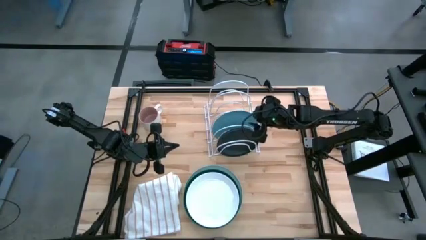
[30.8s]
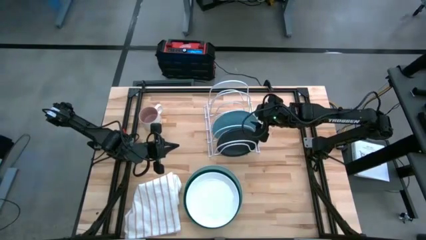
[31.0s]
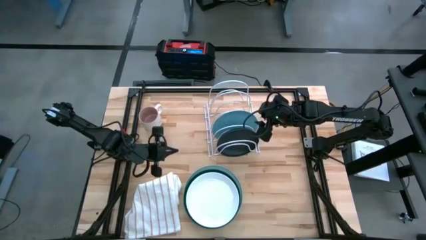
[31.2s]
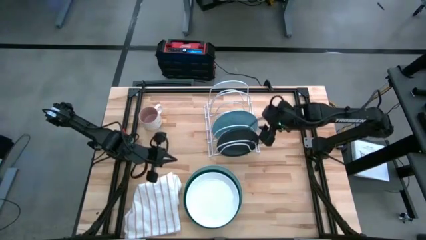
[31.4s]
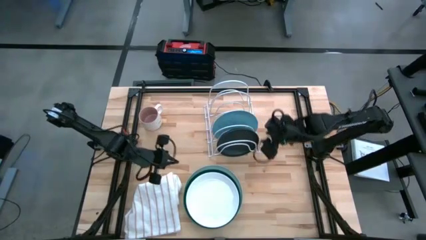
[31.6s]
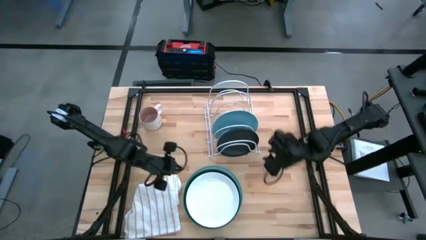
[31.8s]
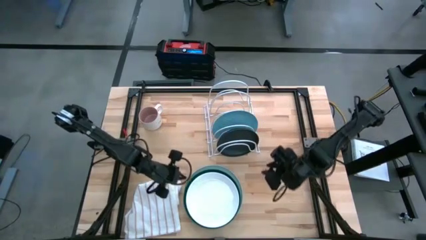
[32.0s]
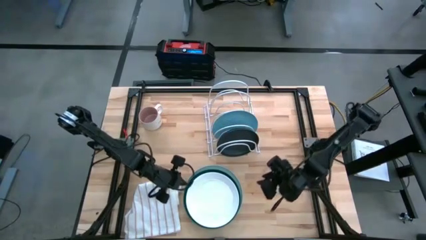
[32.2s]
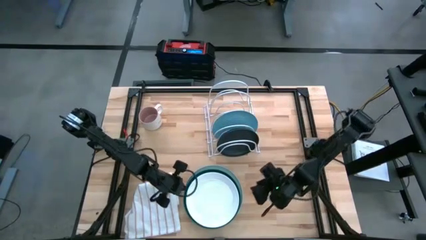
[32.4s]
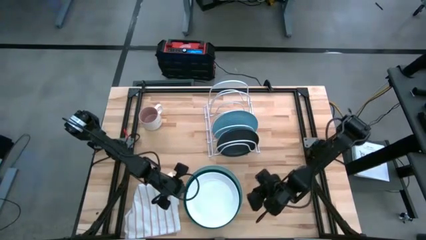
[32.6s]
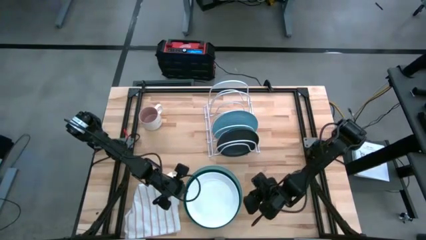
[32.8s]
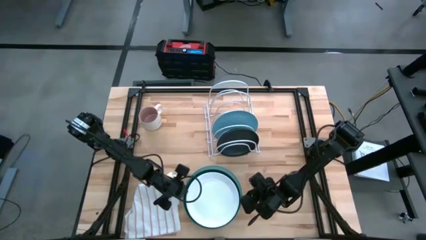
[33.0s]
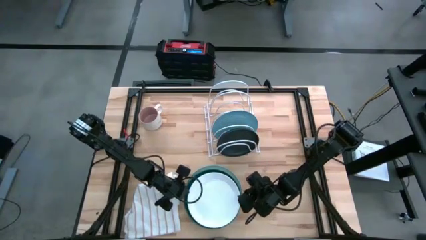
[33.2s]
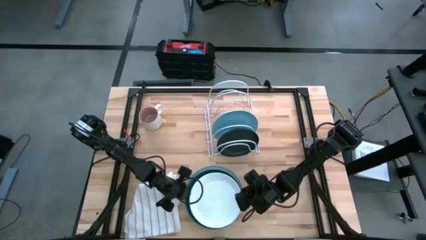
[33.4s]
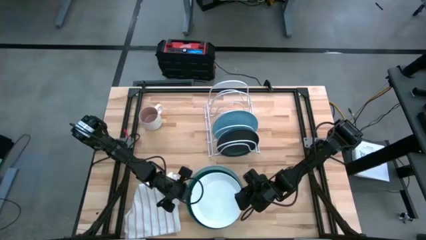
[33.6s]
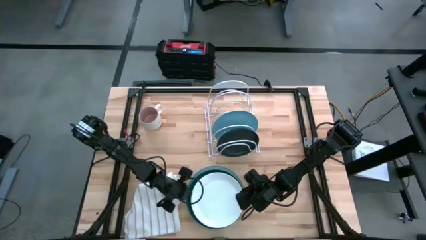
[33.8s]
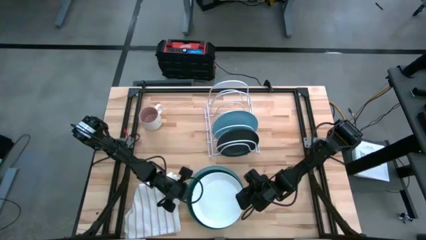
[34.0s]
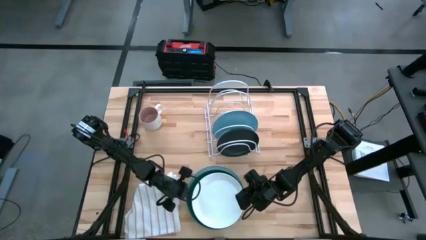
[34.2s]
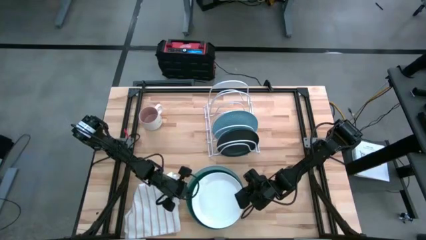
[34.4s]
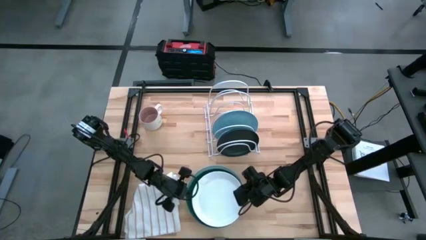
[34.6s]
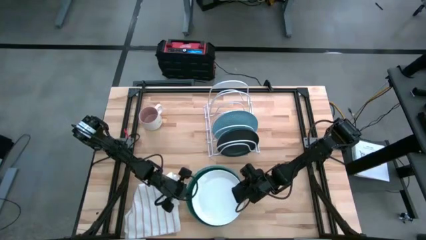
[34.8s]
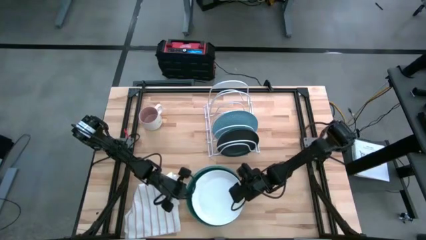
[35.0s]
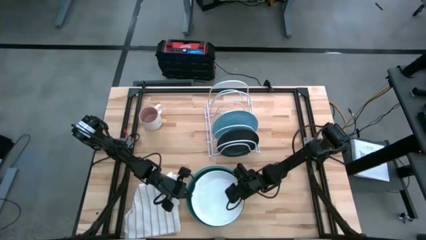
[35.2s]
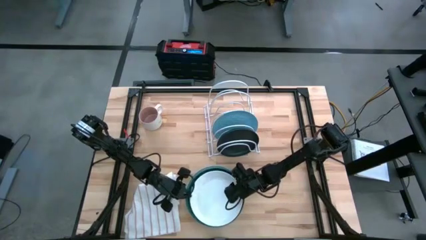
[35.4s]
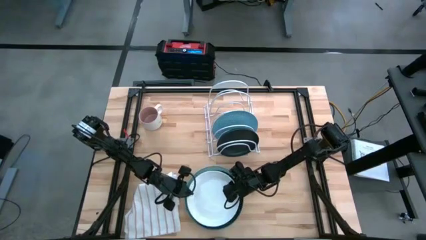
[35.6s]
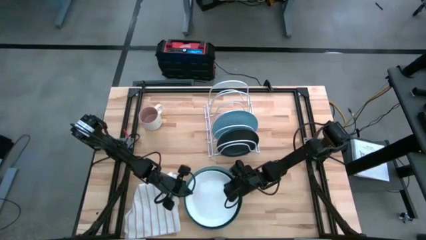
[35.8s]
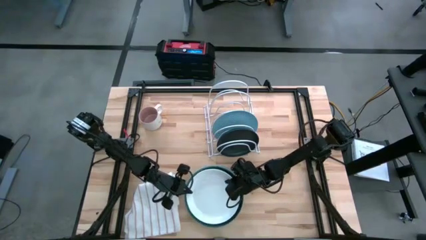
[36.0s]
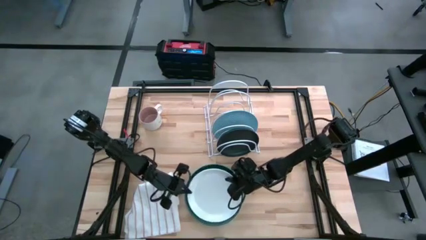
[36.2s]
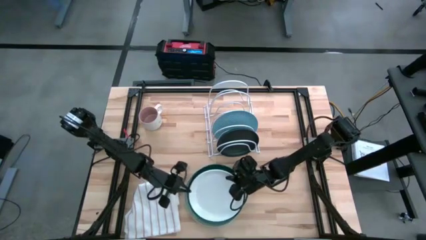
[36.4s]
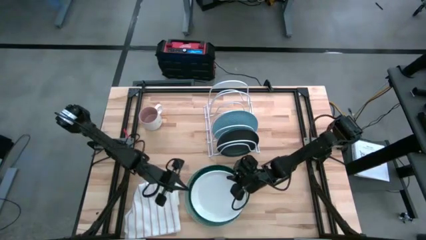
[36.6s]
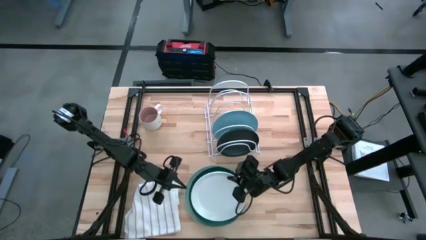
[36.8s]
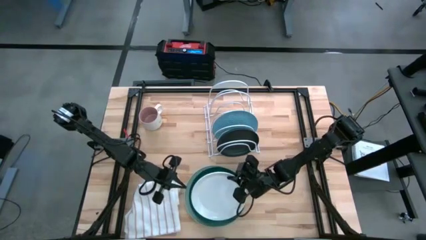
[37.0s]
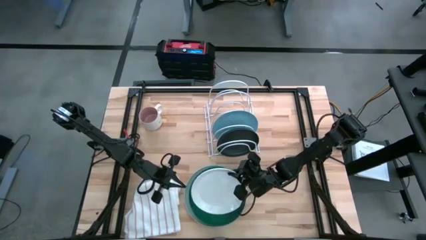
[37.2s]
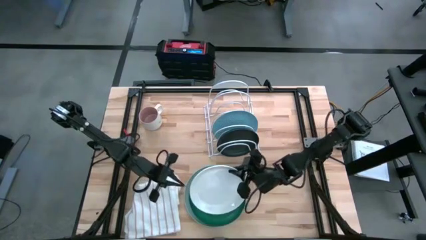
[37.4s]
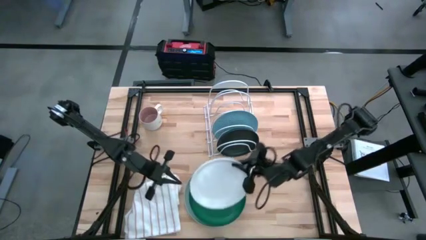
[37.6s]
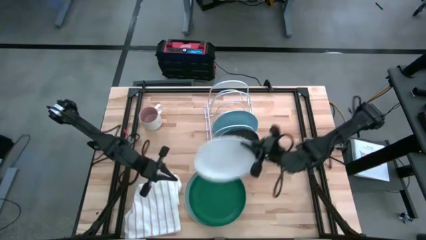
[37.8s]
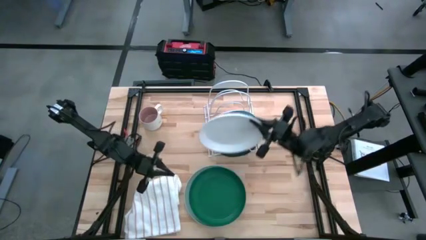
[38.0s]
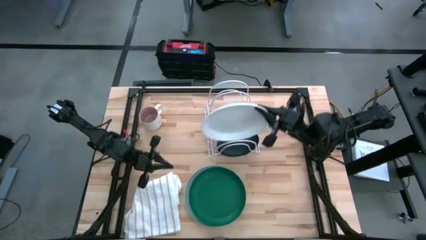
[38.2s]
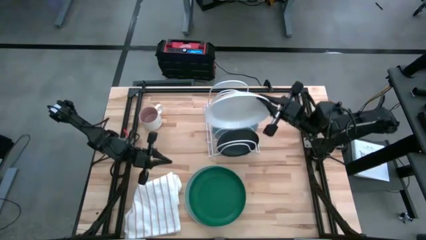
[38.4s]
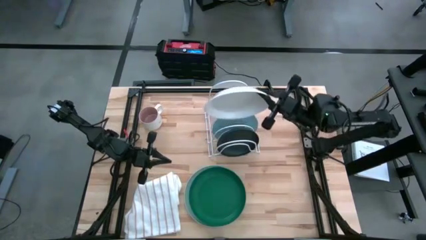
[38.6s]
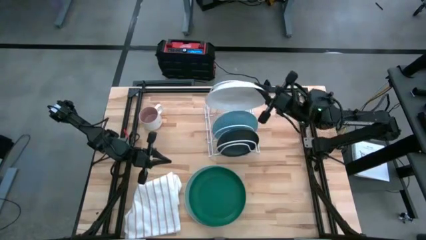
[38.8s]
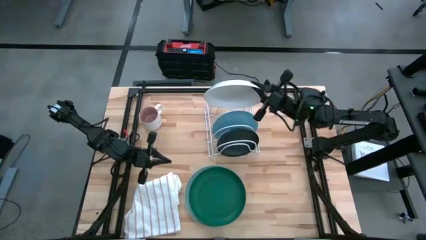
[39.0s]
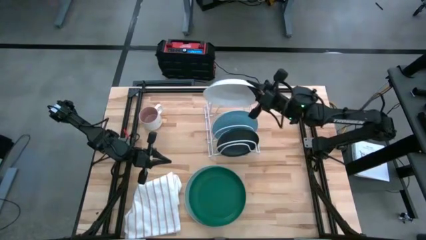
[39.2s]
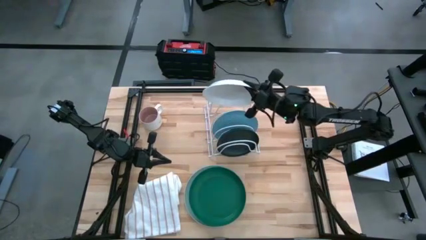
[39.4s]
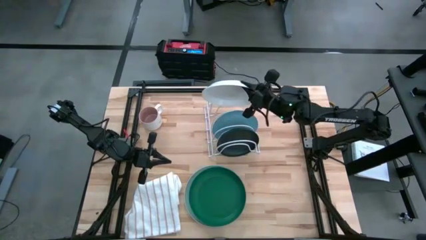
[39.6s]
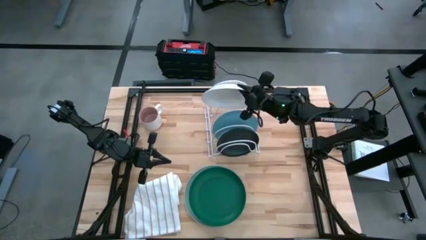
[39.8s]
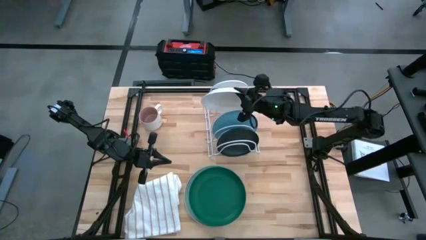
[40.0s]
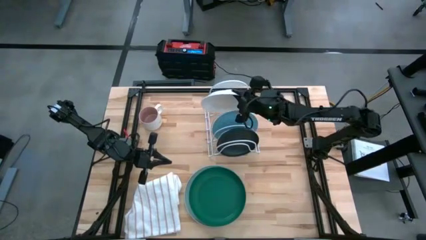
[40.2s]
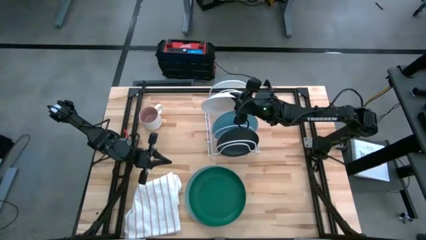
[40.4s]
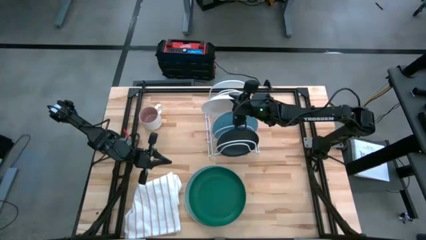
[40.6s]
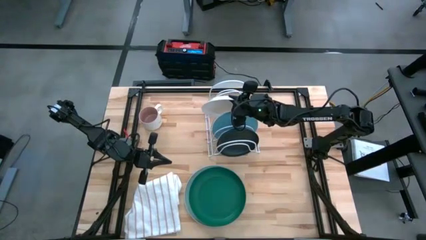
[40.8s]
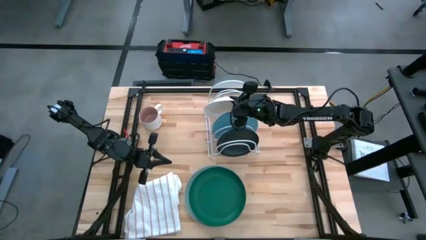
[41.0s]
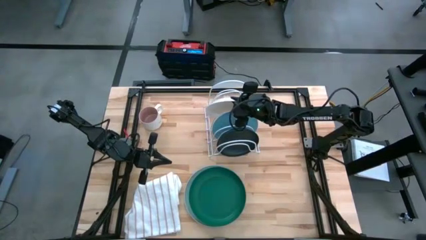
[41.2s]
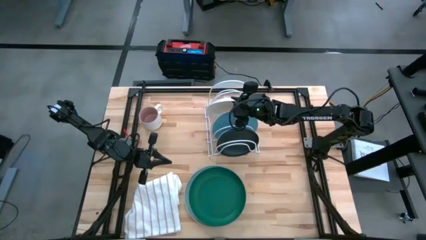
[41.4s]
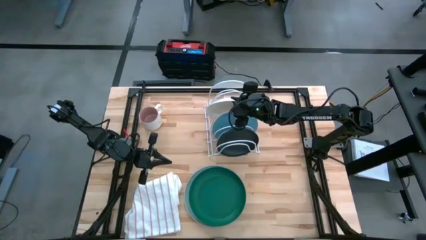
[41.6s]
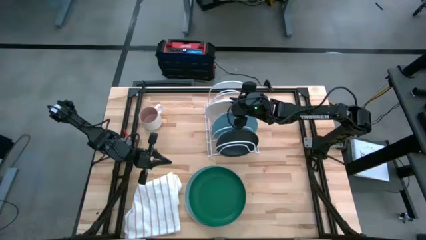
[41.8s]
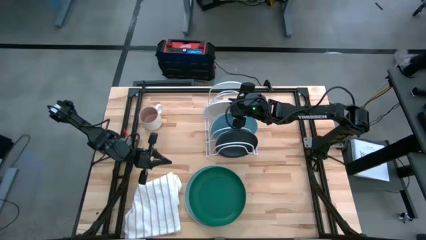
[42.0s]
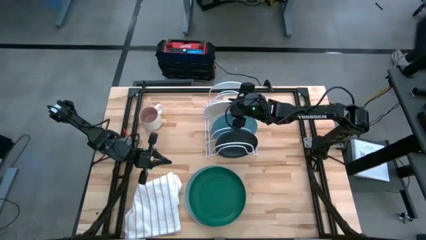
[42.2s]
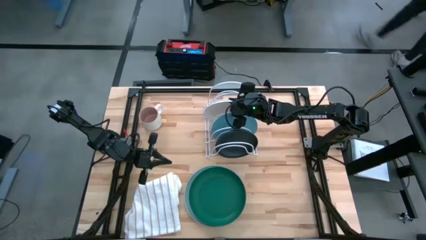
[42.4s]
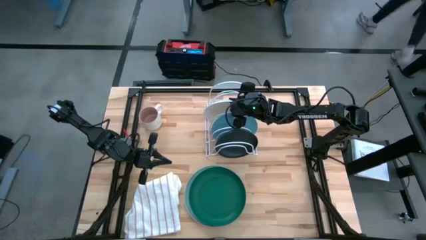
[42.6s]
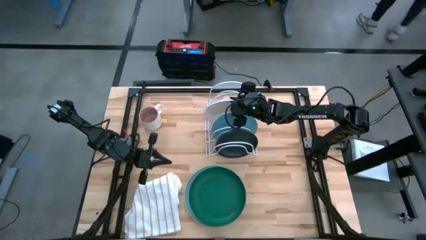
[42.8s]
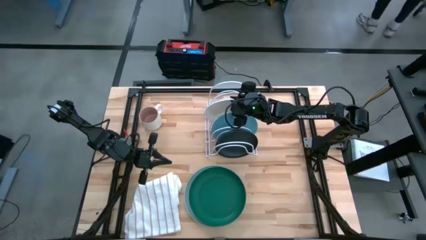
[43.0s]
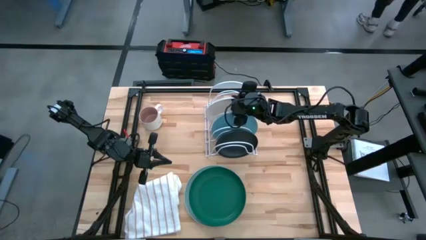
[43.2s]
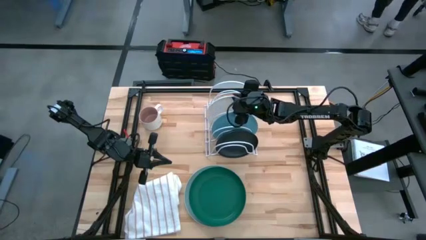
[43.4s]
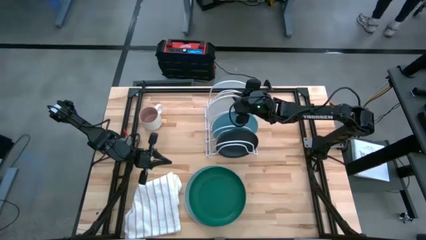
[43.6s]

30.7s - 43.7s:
Task: Sort dishes
Put the white plate into the dish rack

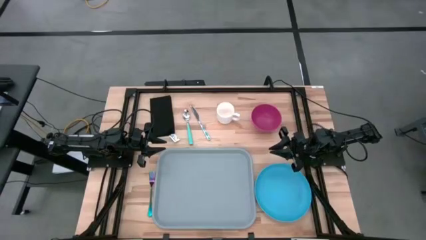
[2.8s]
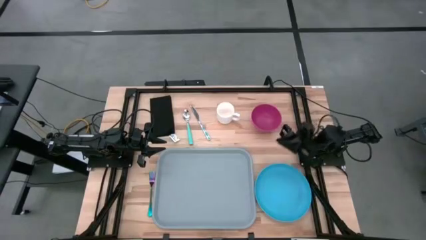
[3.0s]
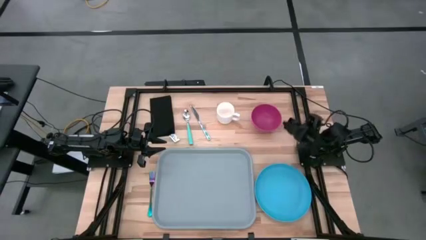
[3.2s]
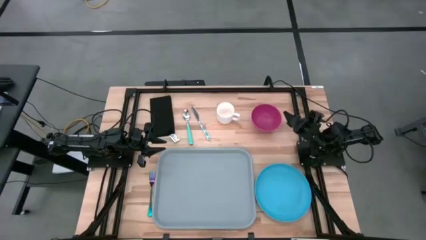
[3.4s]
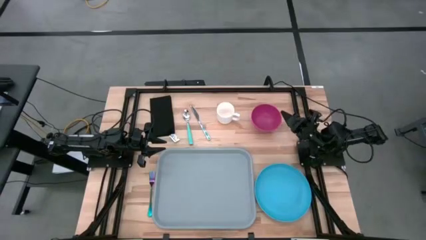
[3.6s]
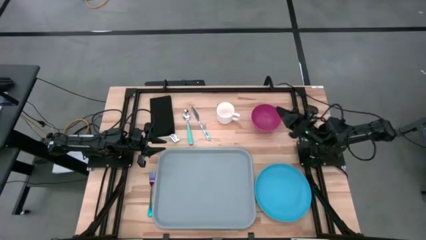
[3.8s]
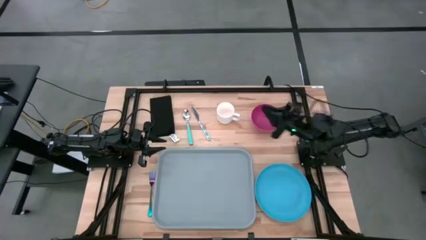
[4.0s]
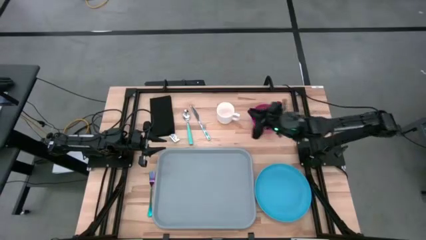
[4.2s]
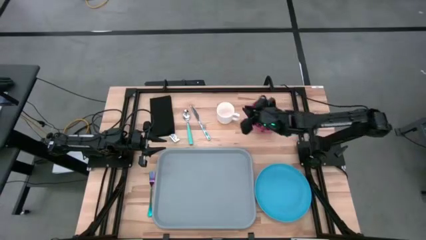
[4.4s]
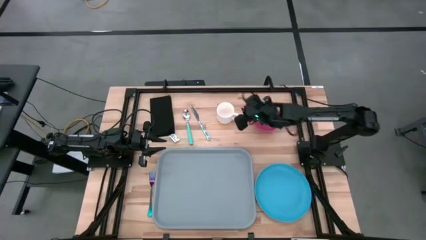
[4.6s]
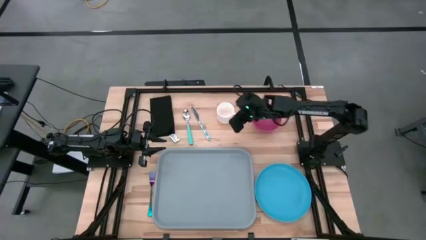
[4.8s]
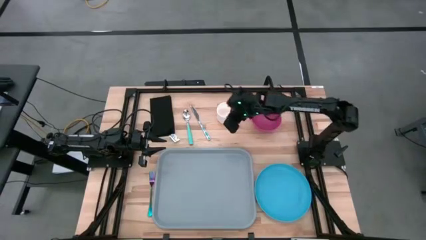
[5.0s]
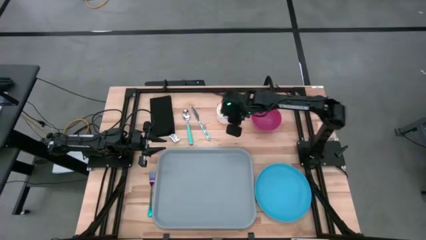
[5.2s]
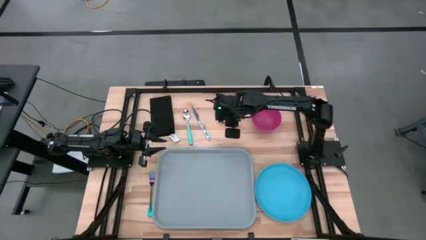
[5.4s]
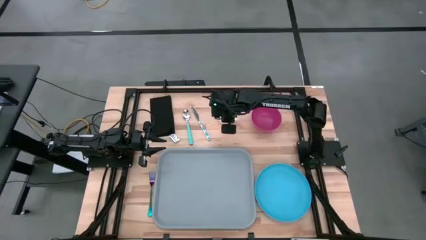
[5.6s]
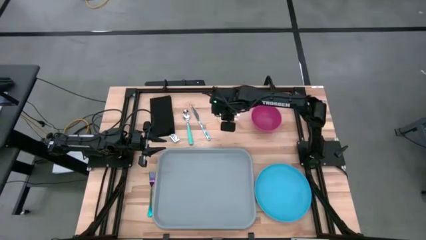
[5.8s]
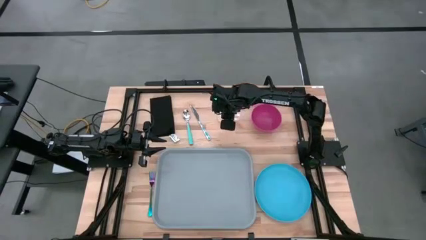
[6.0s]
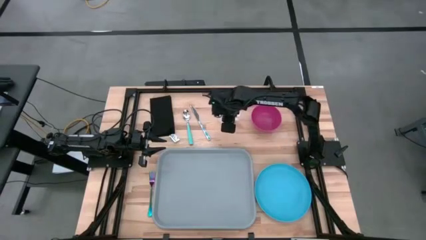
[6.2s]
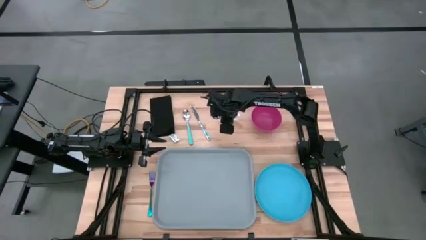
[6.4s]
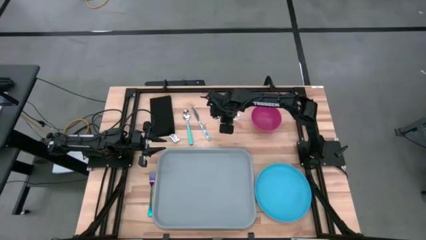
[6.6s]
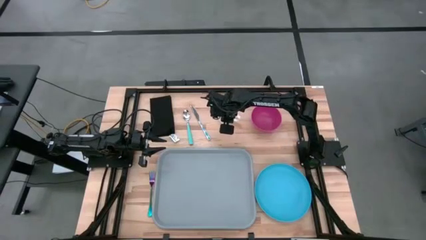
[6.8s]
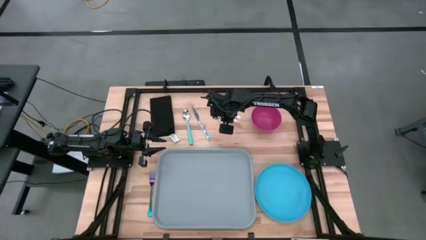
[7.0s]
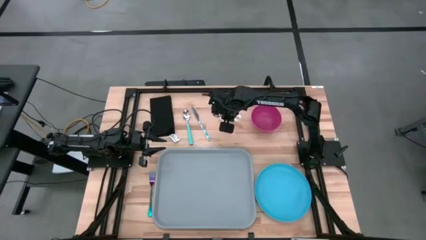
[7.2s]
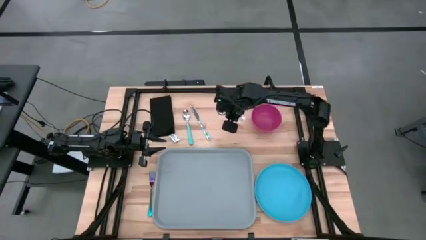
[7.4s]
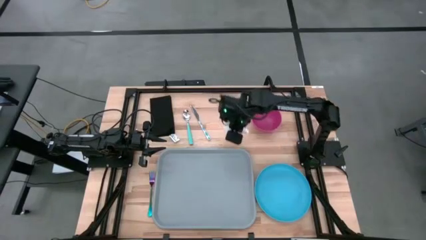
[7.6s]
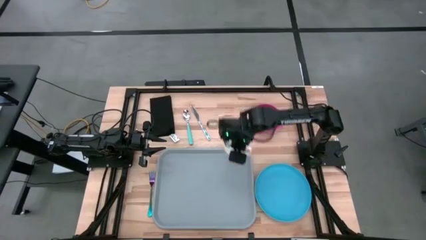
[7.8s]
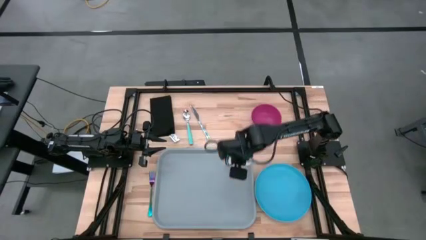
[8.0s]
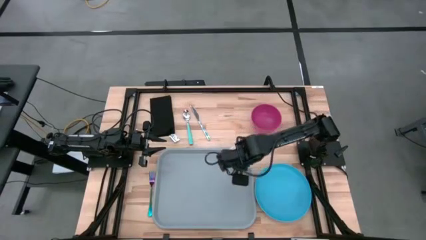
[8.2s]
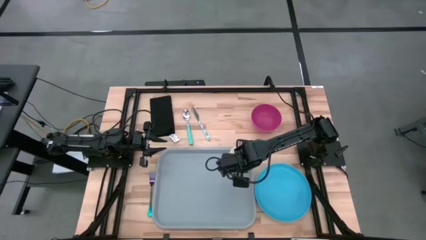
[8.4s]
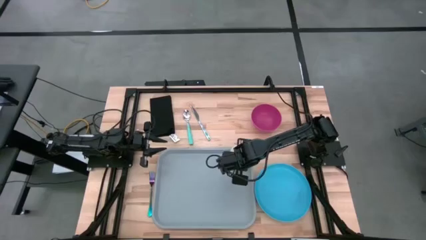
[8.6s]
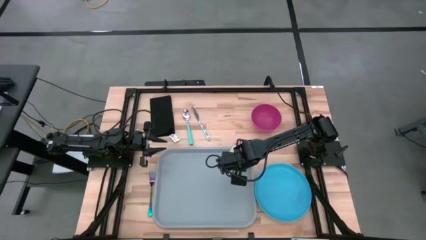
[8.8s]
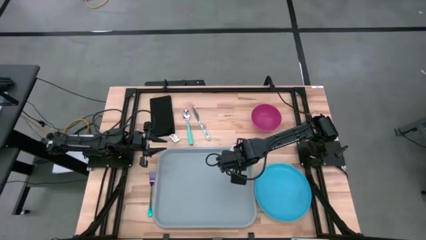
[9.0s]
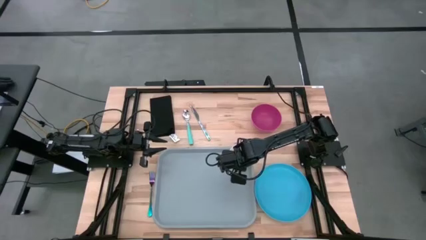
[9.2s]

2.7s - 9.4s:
Task: Set up tray
Put the white mug on the gray tray
